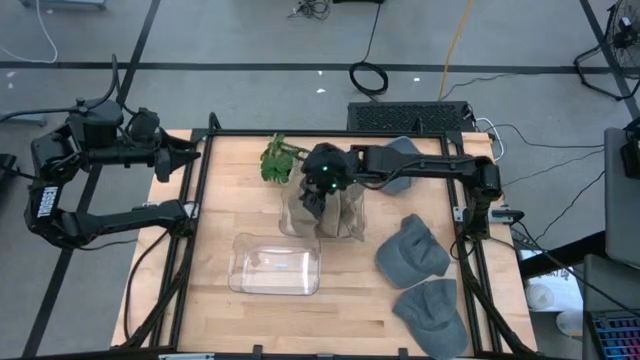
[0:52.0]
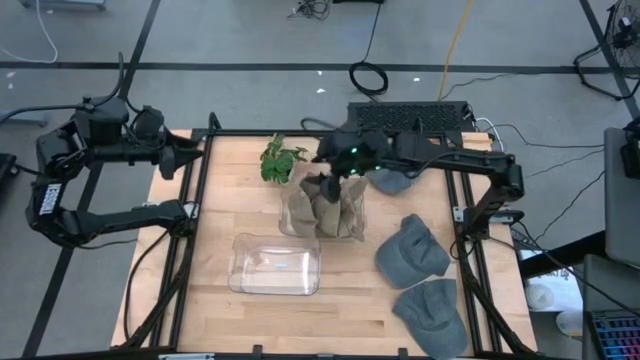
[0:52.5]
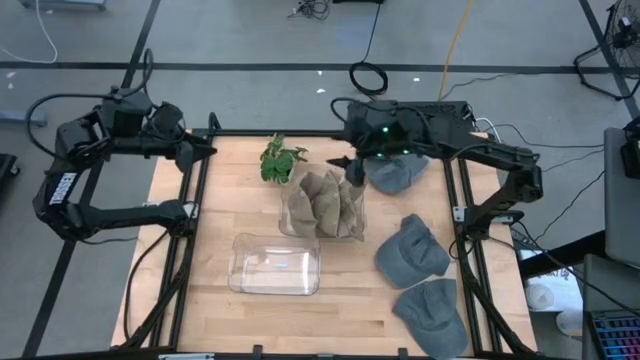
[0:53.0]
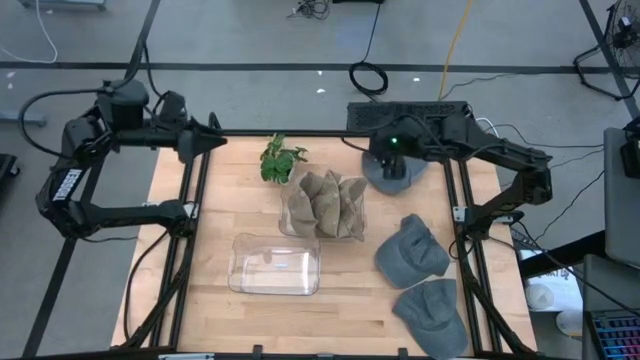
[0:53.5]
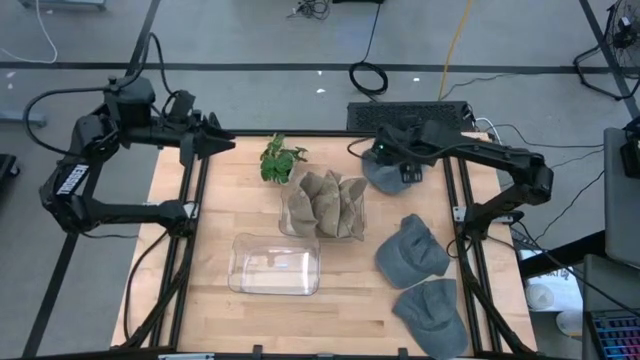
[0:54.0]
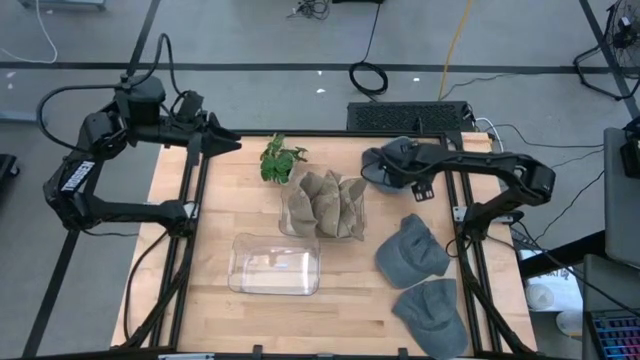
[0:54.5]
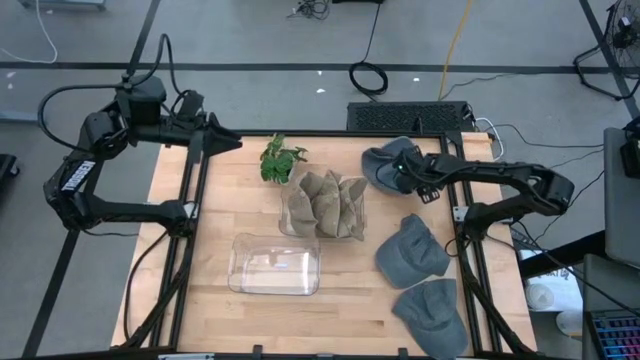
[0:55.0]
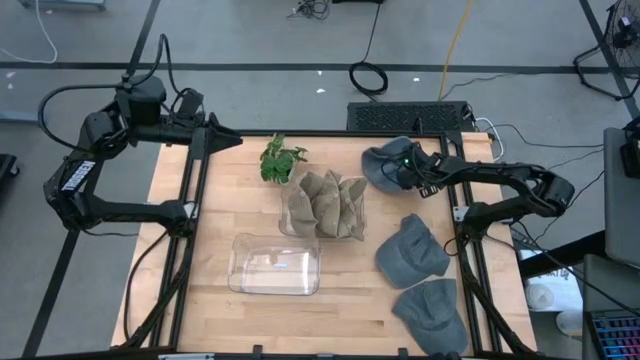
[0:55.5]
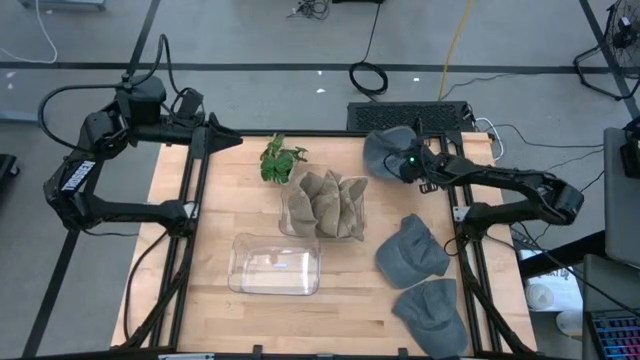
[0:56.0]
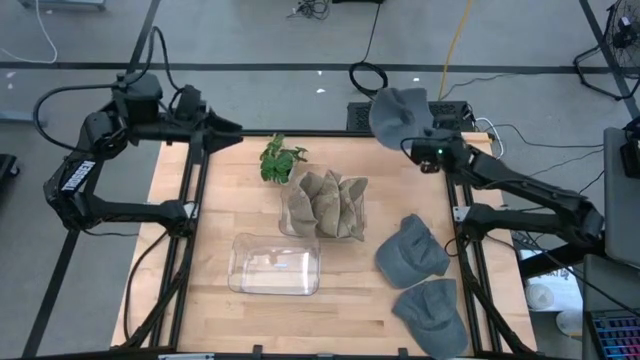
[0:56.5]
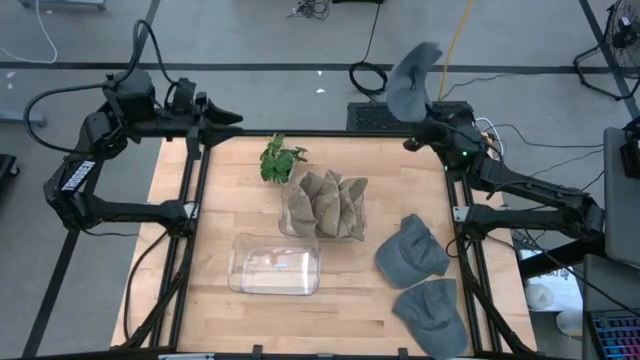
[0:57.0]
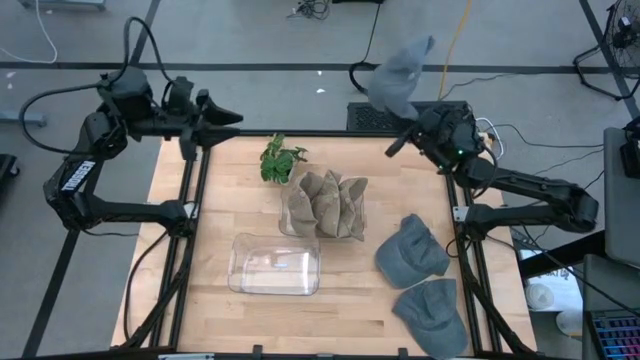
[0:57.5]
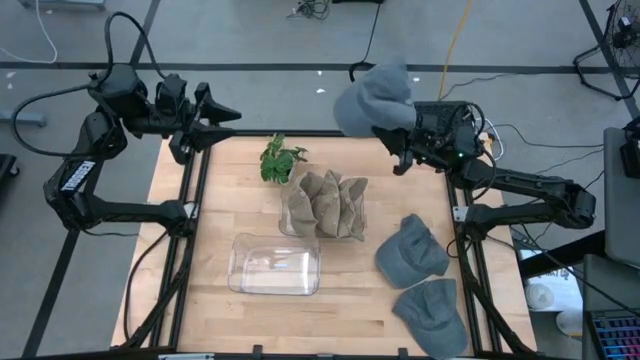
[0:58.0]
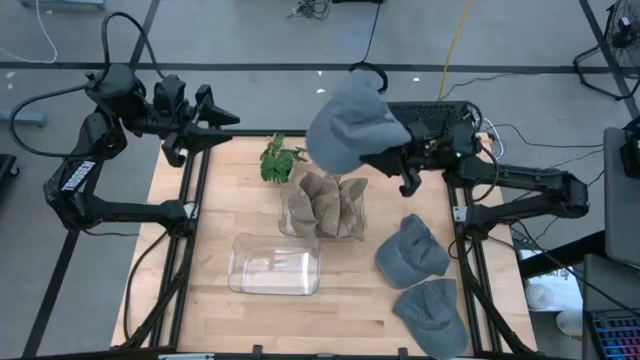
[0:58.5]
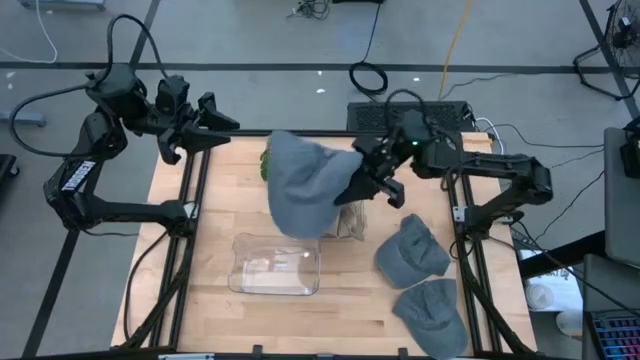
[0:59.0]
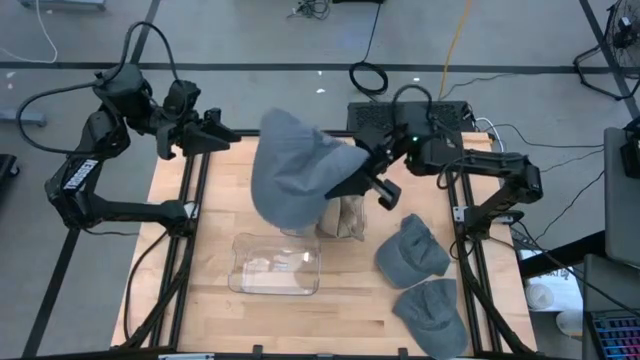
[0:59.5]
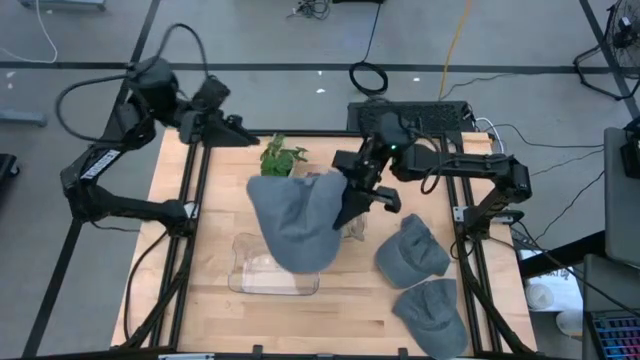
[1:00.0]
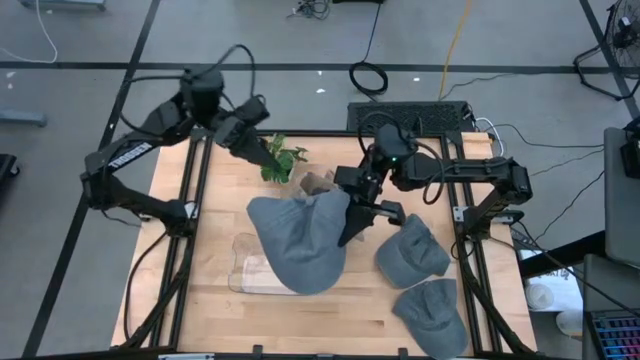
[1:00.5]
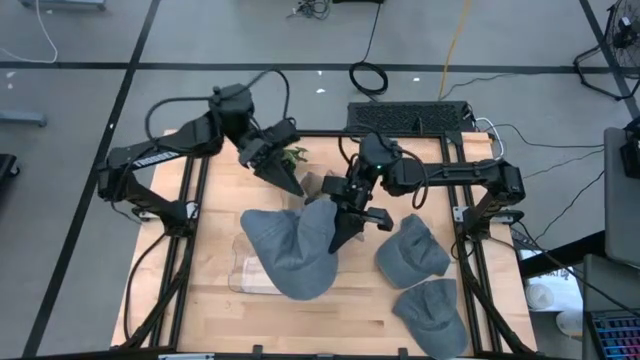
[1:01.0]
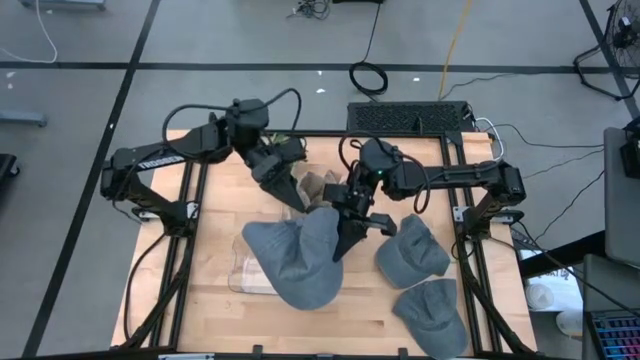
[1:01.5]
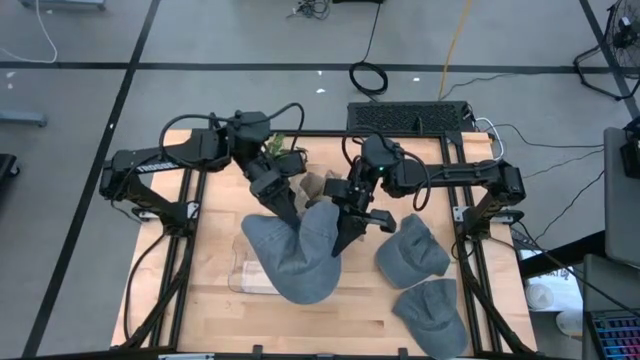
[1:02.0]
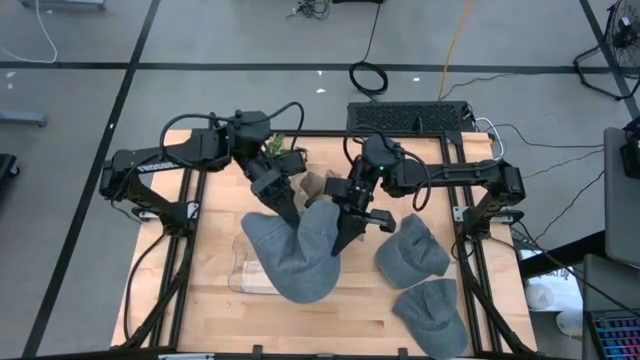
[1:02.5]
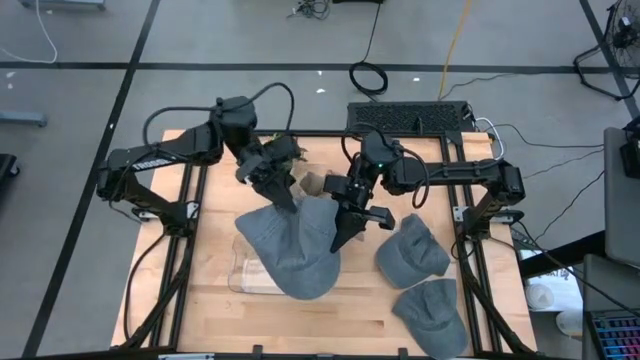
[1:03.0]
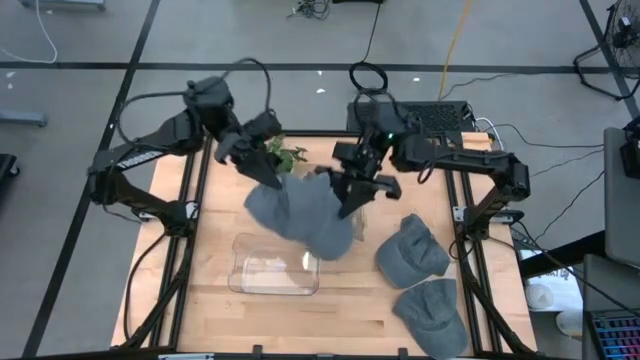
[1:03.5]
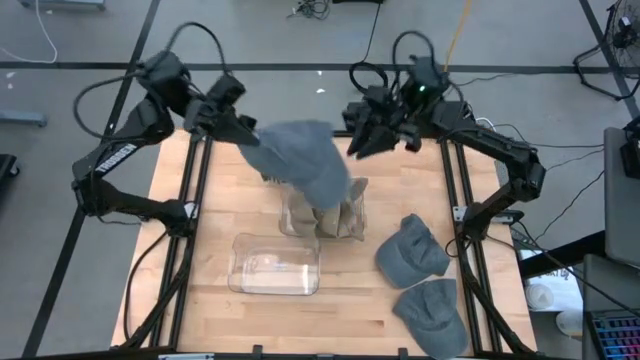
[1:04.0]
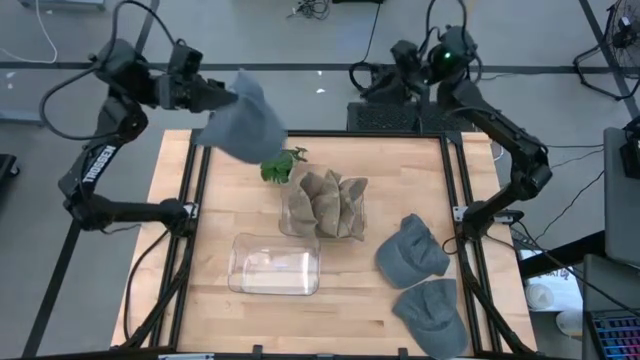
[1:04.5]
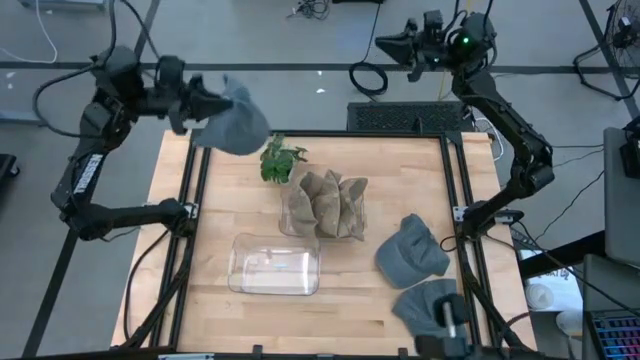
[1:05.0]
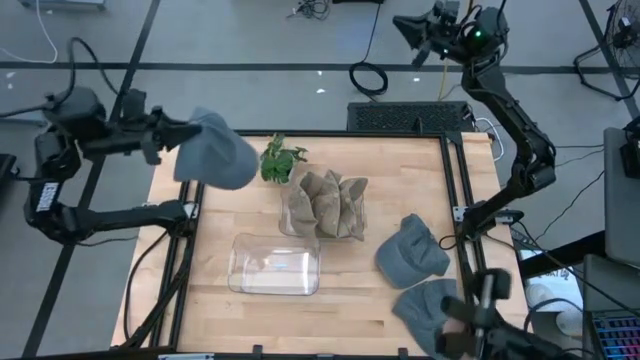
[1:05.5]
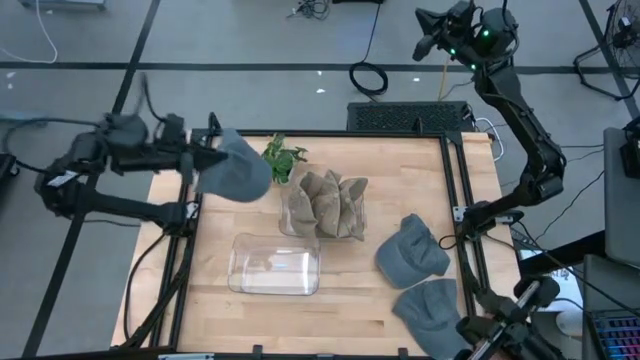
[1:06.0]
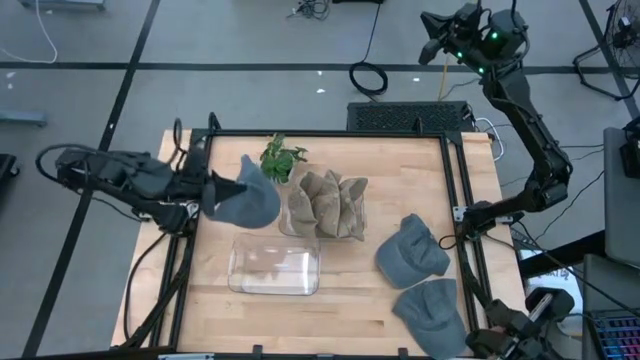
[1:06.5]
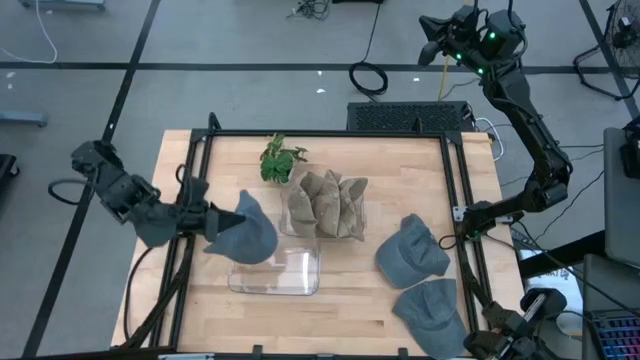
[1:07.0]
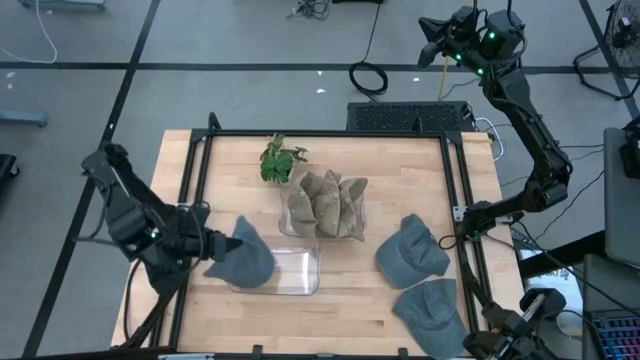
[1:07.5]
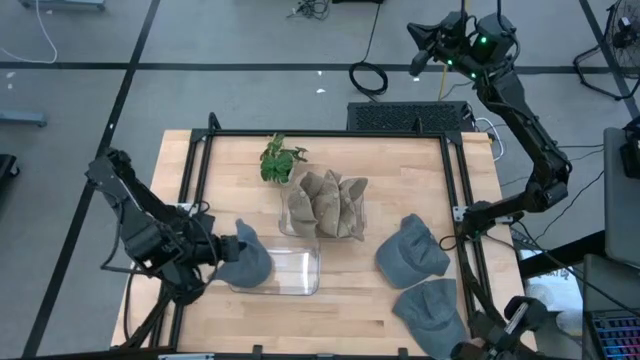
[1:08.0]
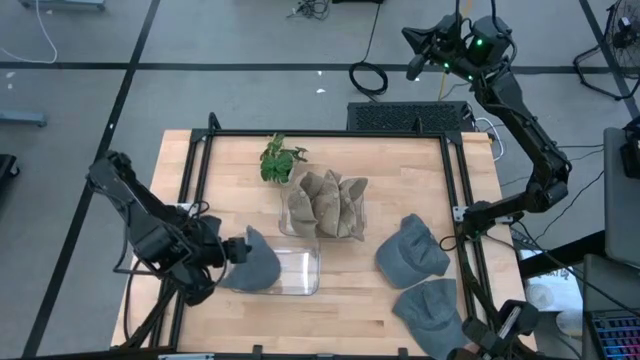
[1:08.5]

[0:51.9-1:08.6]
Task: Pick & Place hat
Put the top blue cap into the bottom transparent bin

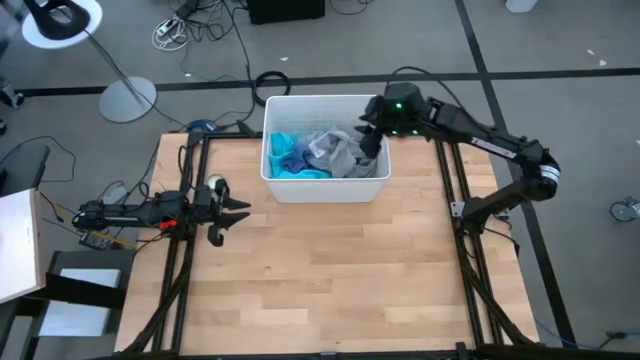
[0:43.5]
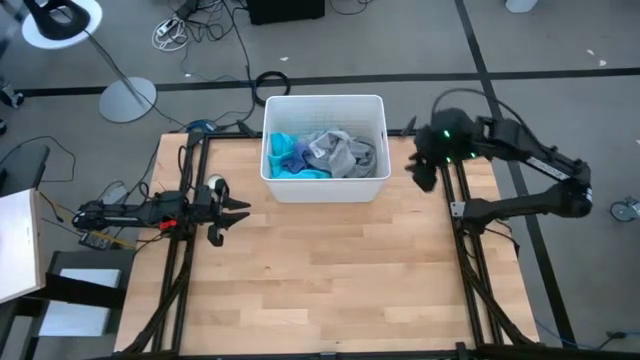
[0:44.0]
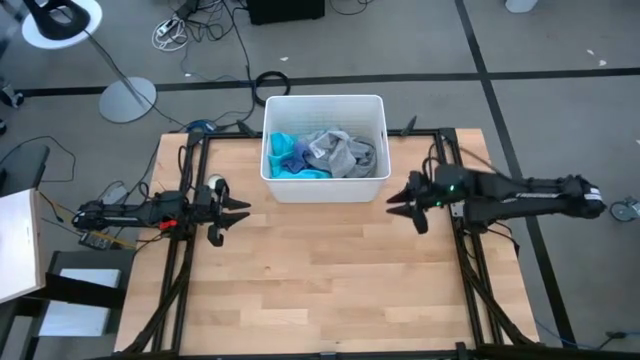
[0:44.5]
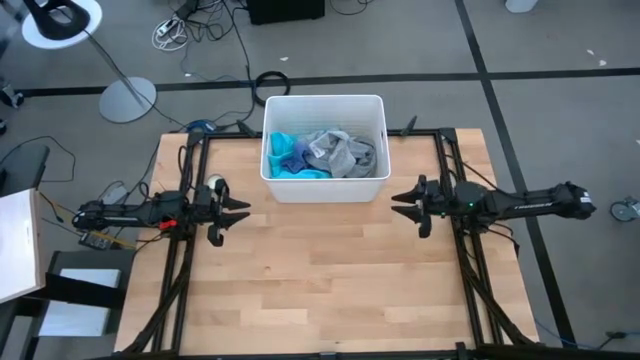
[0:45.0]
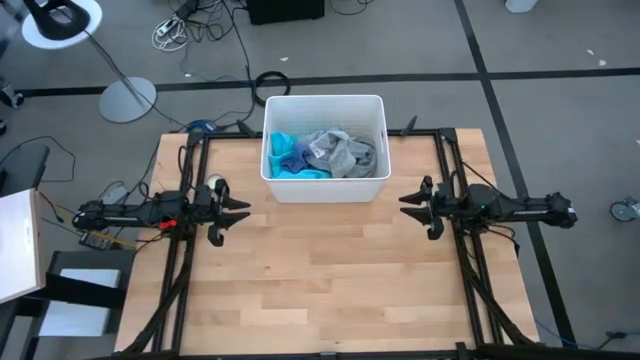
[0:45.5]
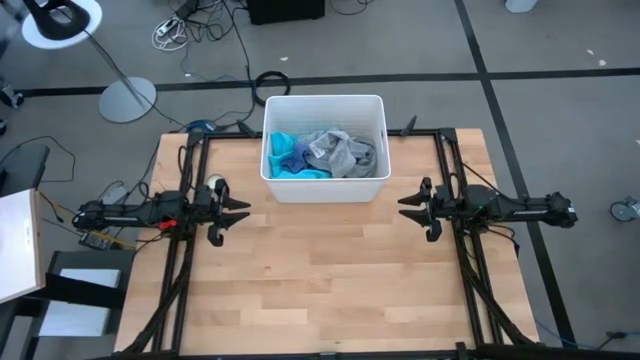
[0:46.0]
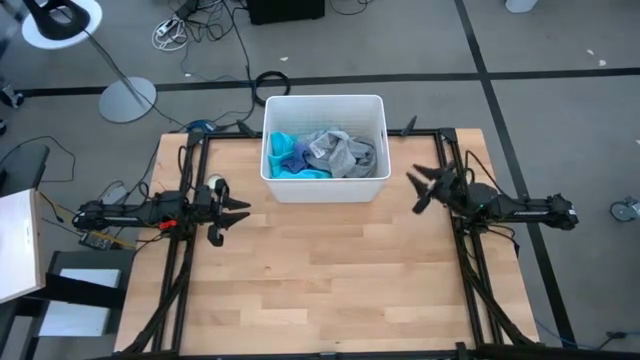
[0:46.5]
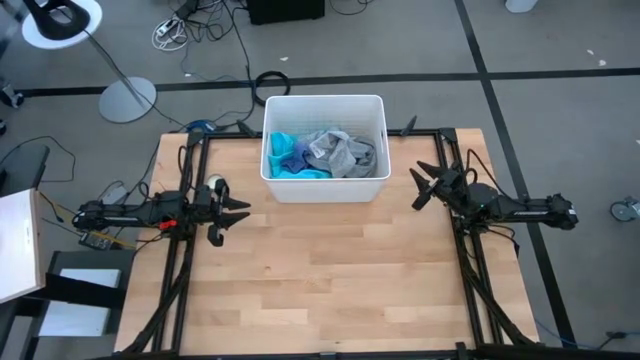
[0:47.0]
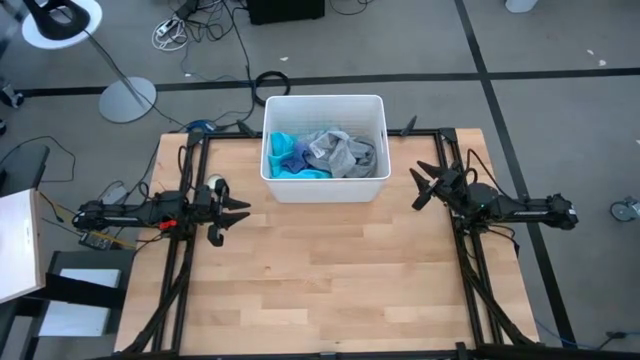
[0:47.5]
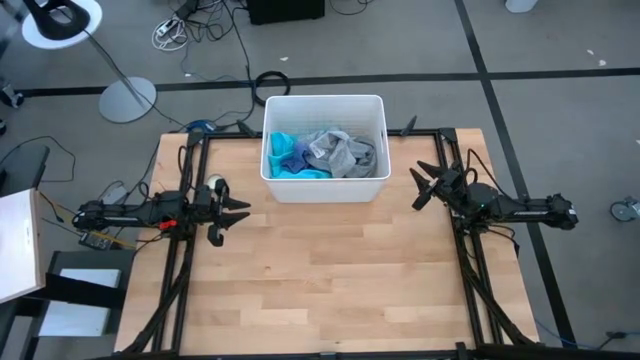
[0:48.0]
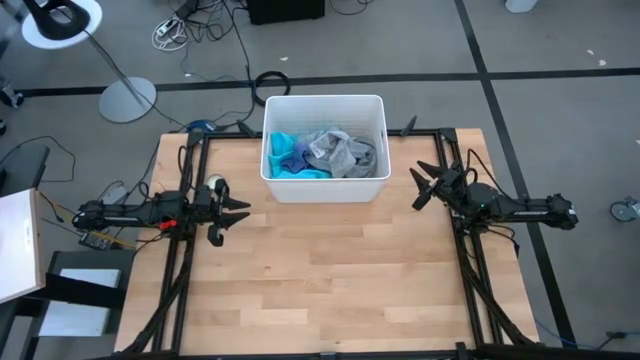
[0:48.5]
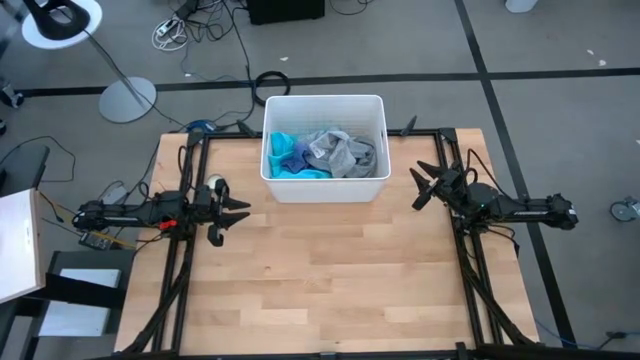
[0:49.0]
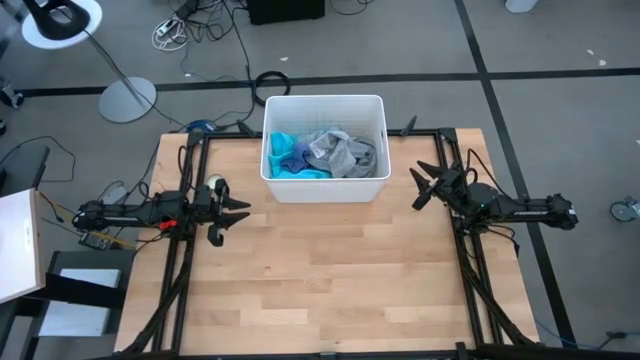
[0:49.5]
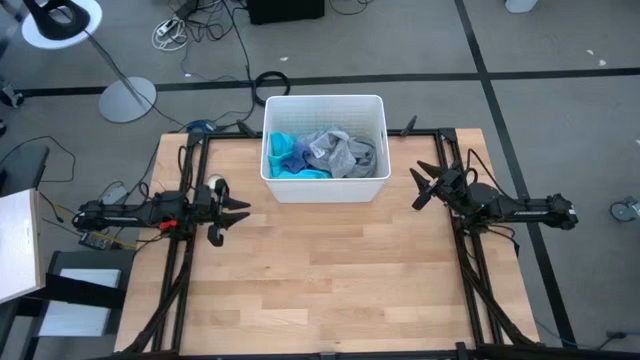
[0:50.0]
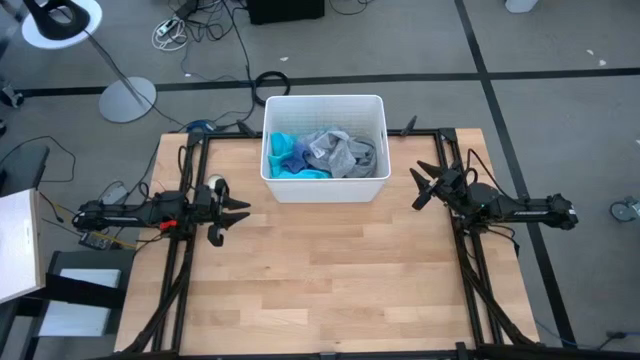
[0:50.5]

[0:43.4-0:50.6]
Task: Sort clothes
Return to home position
